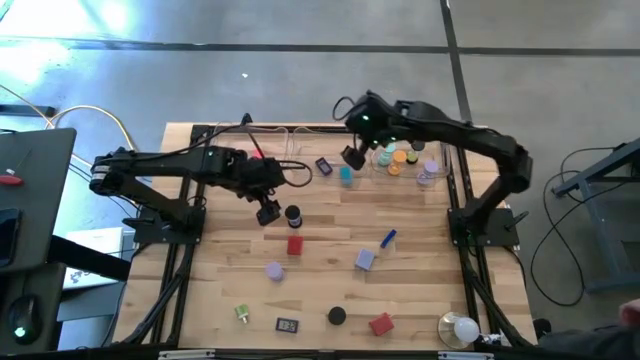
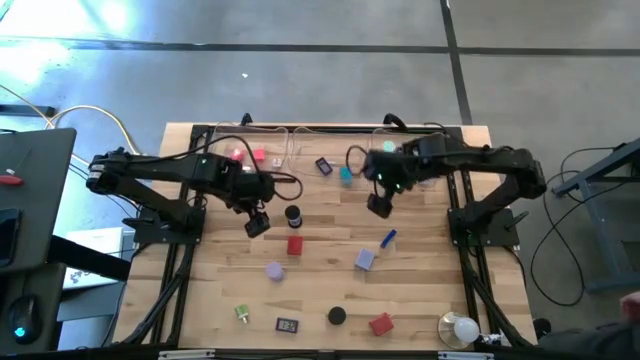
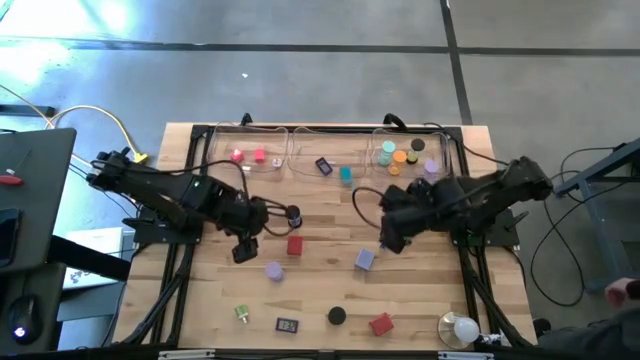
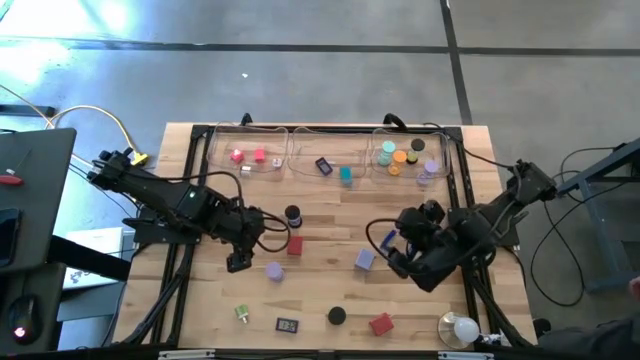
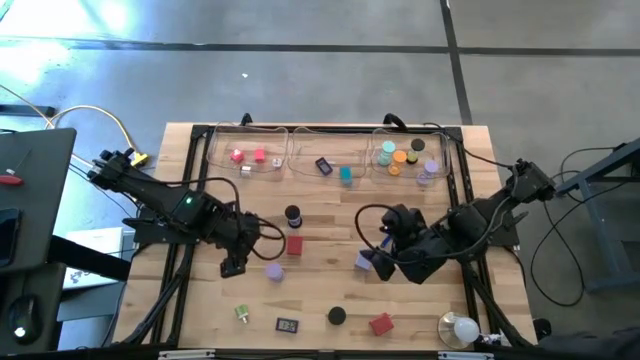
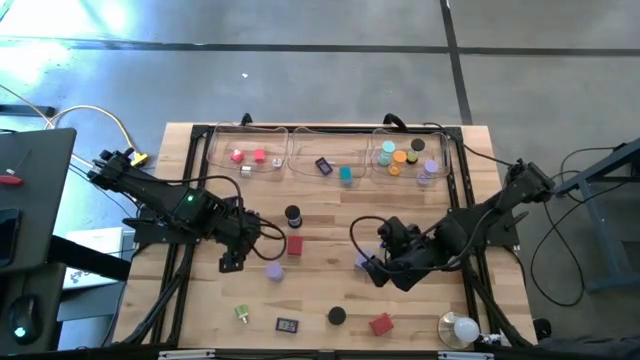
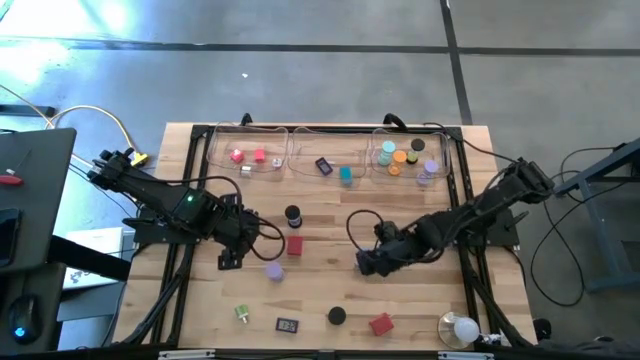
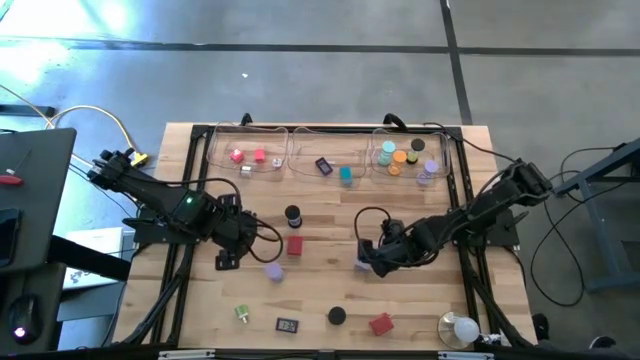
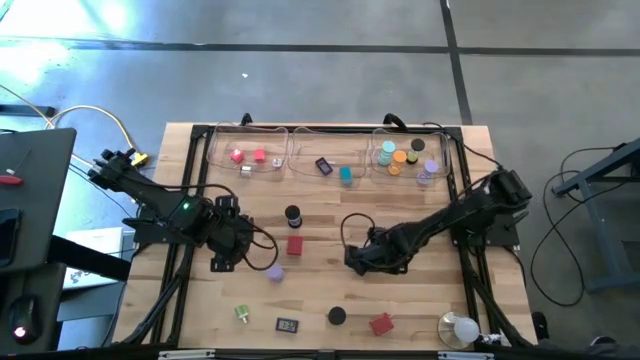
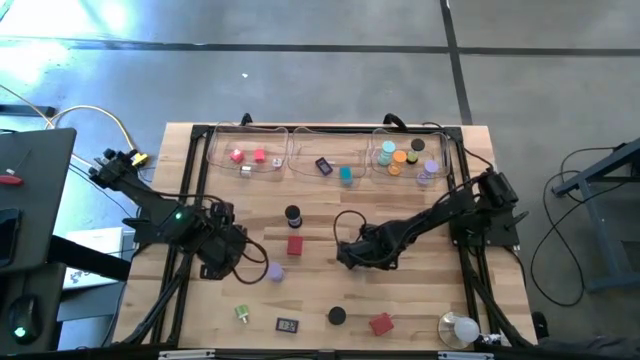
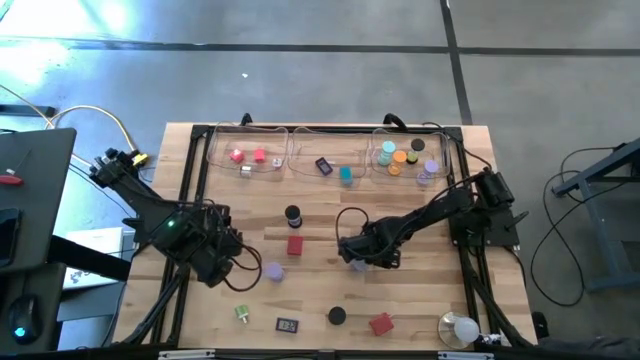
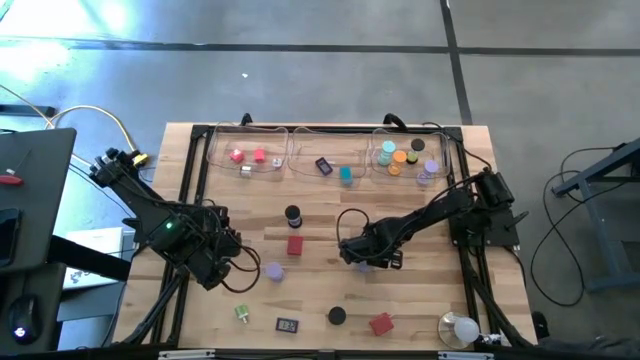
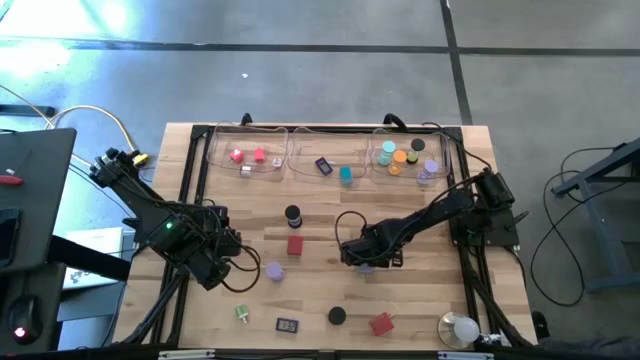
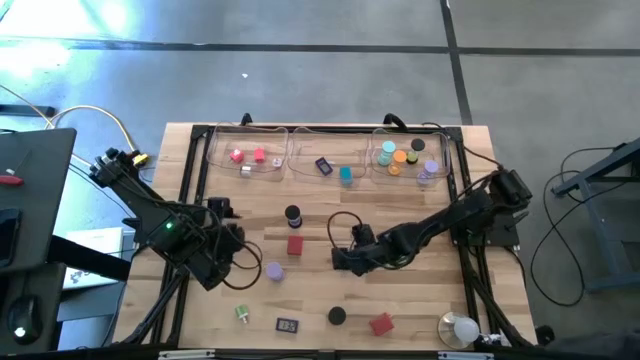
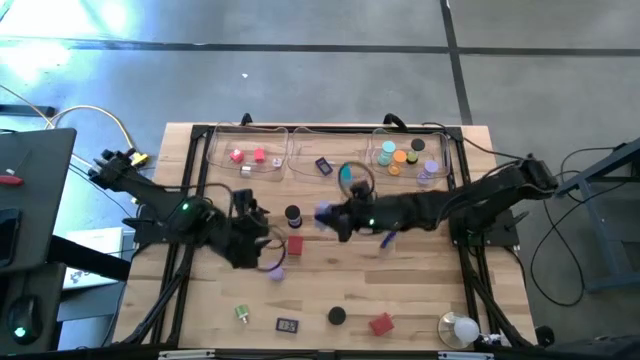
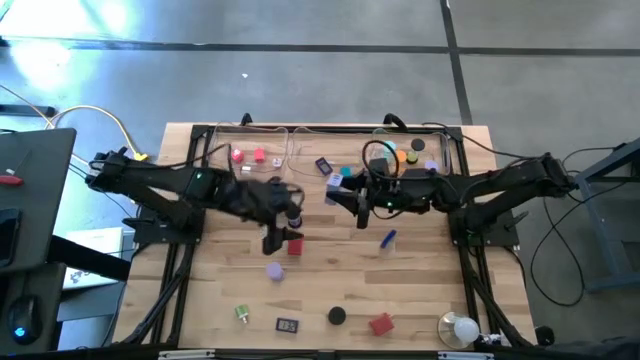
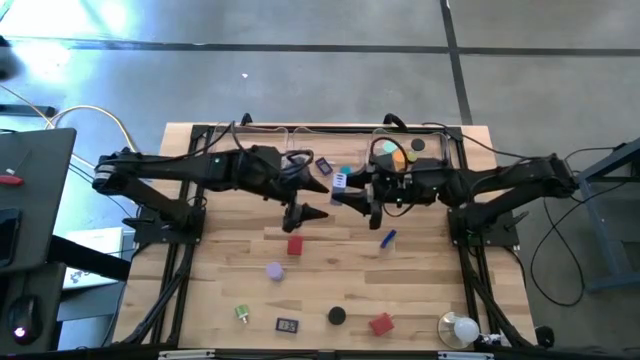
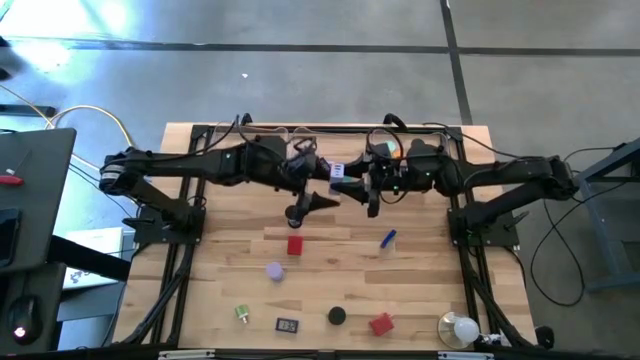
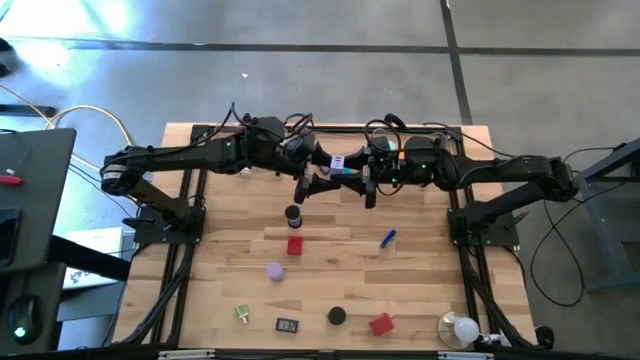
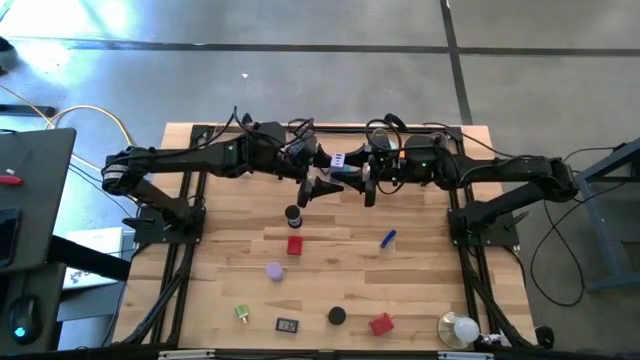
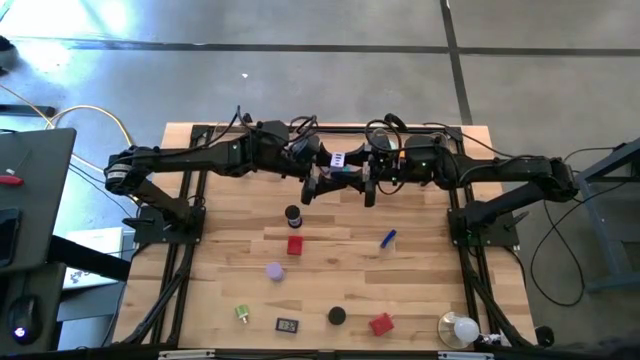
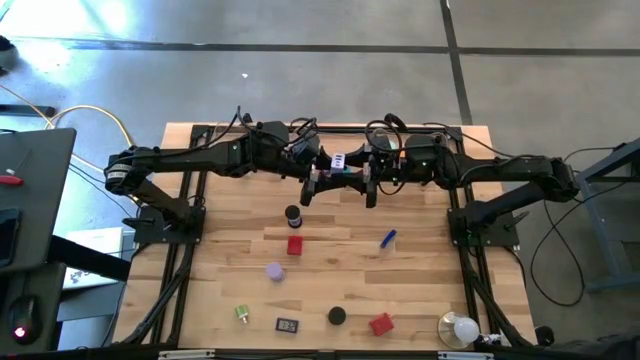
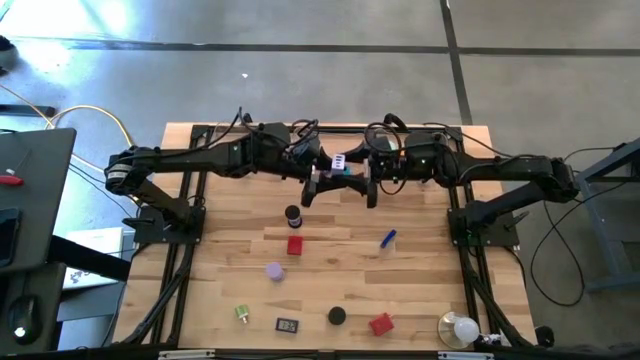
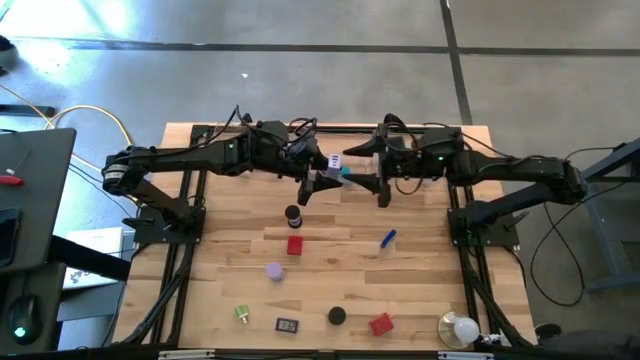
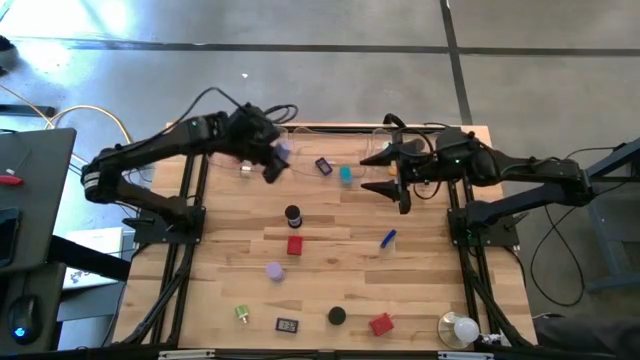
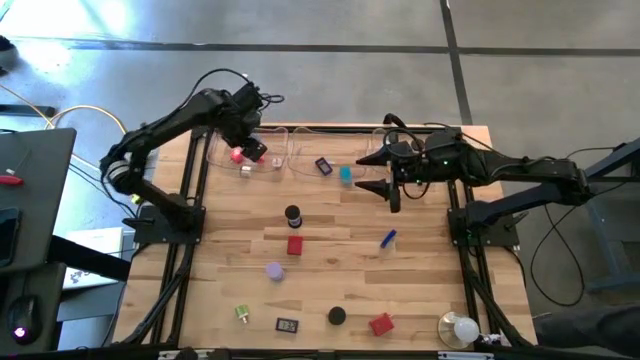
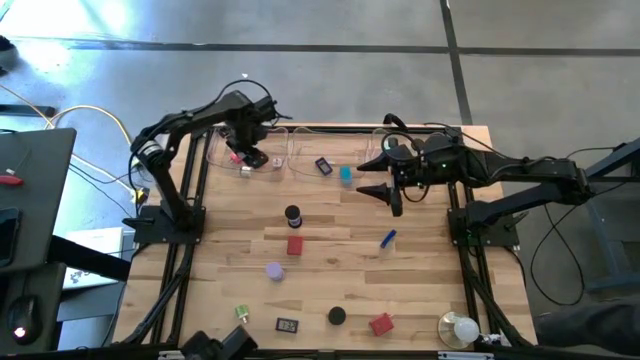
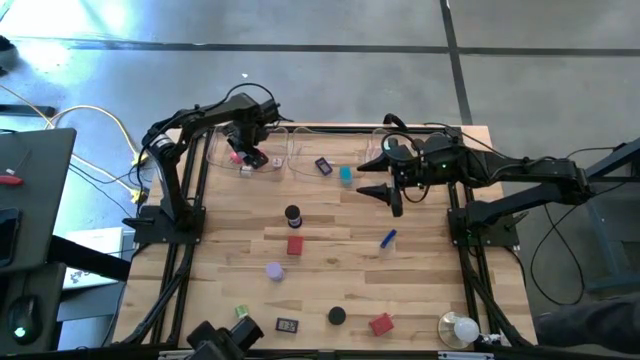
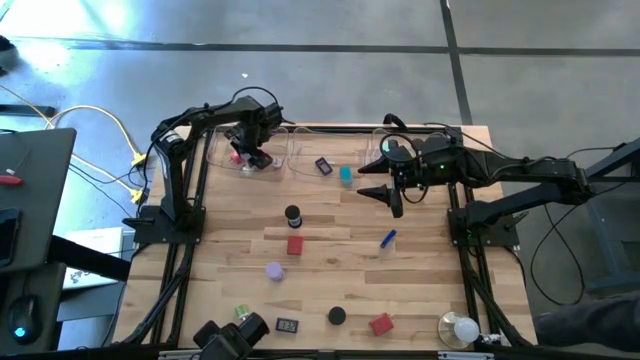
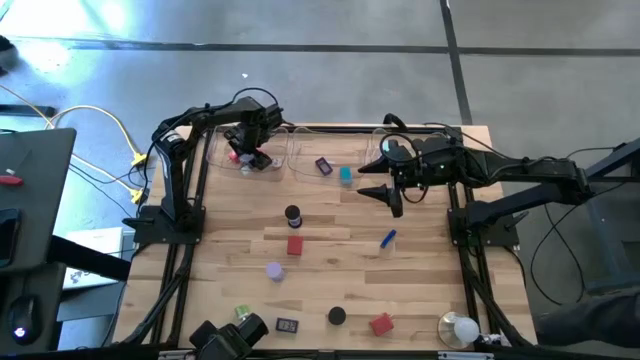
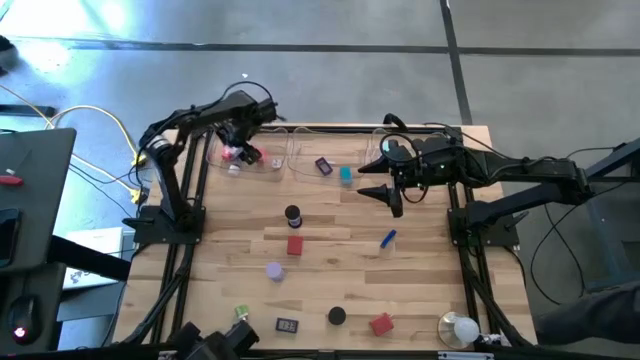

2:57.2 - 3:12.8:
Task: Pick & Place Office items
Put the purple charger adapter into the left transparent bin

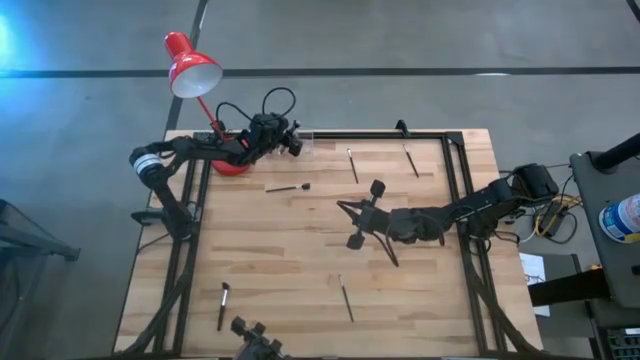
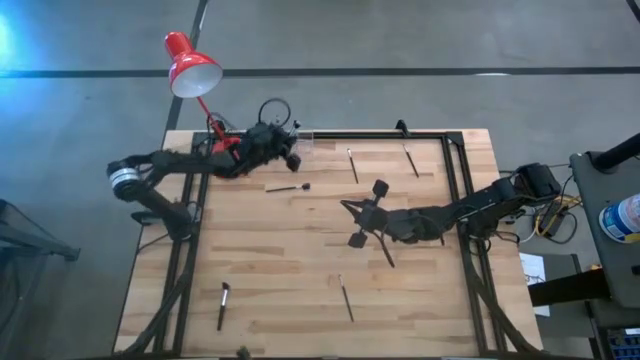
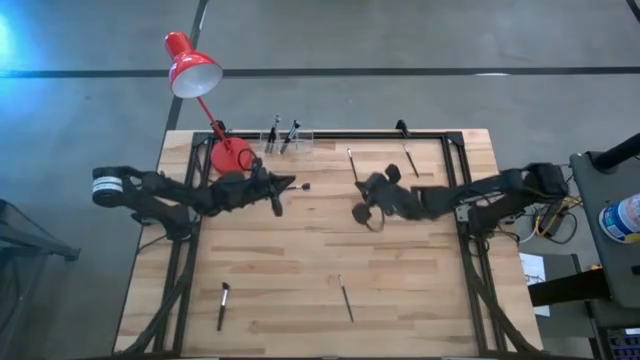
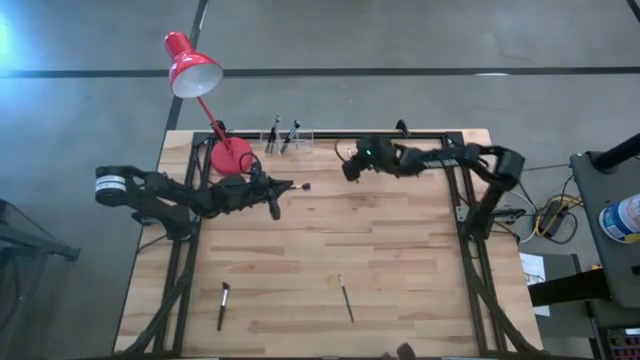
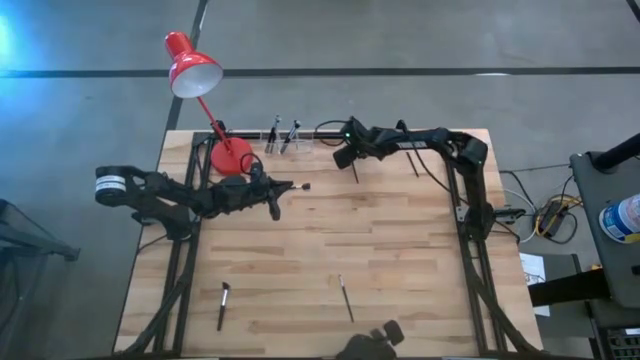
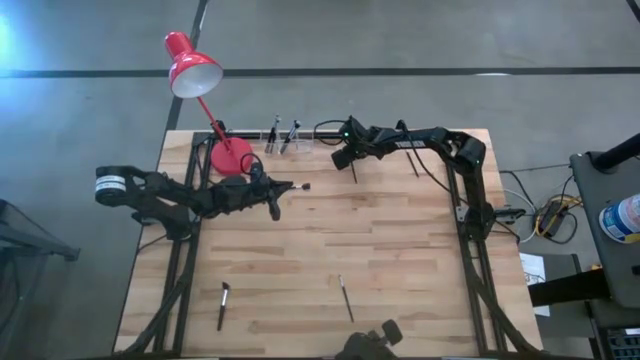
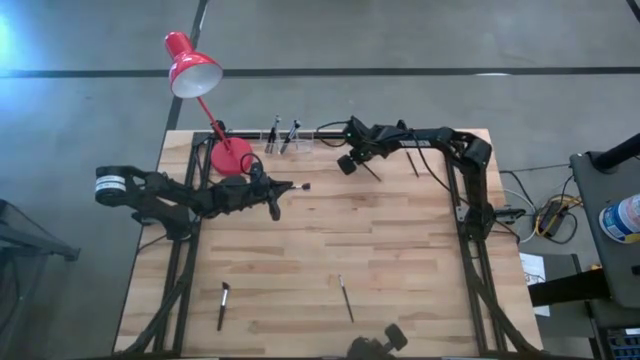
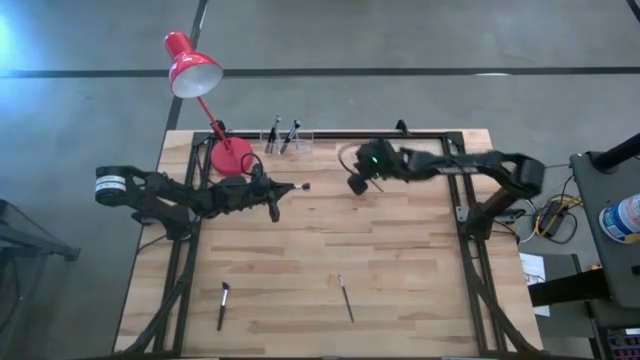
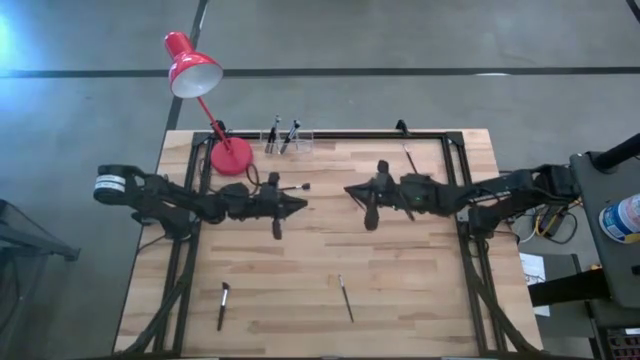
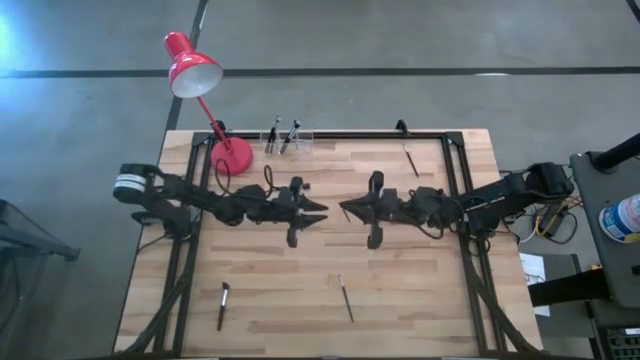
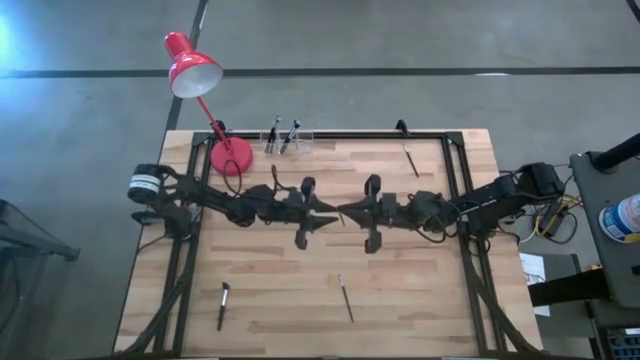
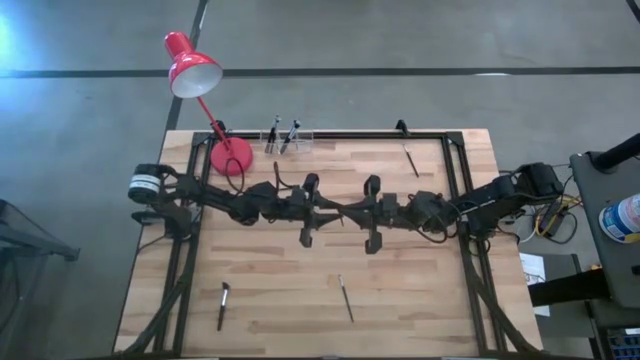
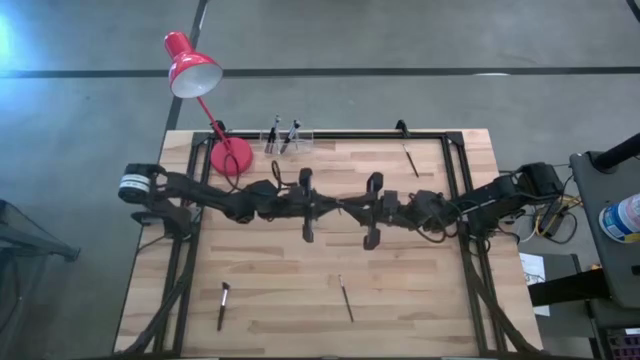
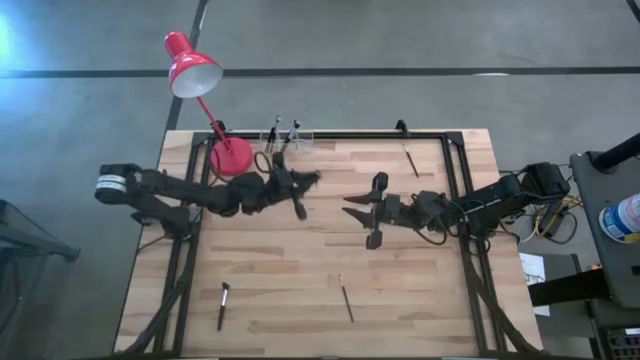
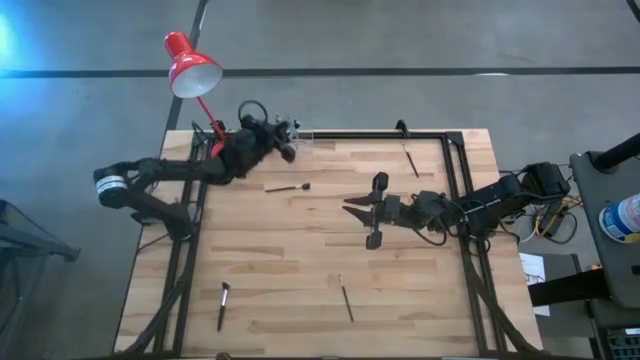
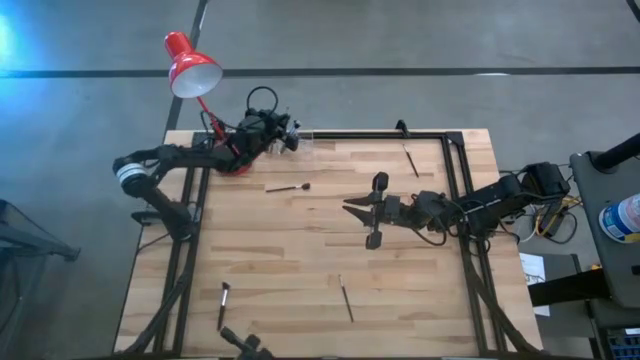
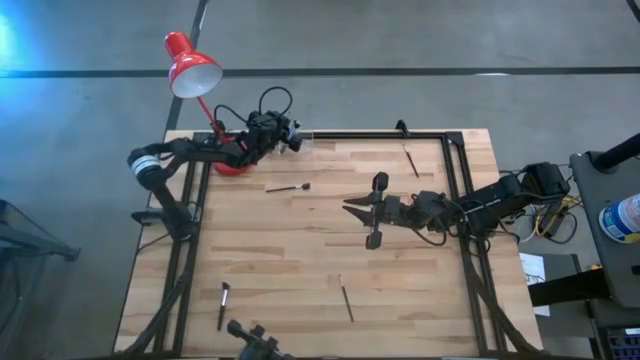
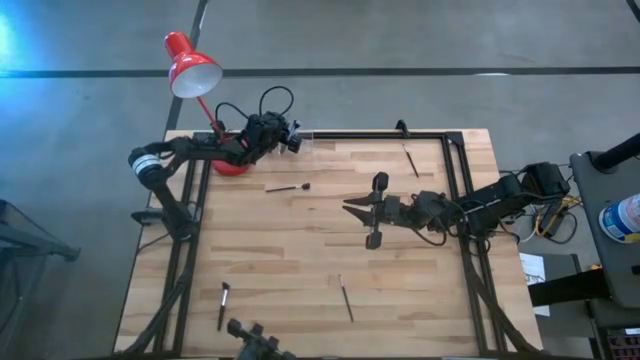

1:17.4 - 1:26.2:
Task: Pick & Place Makeup Supplies
Put the makeup brush into the transparent organizer
